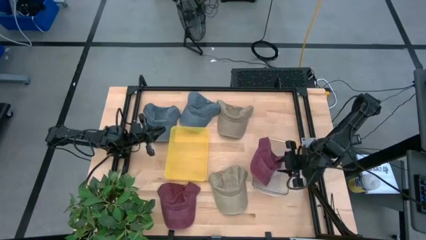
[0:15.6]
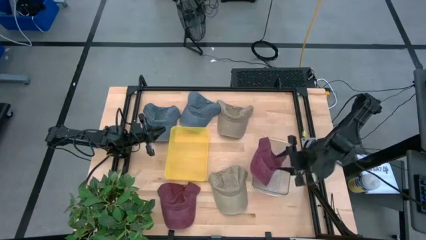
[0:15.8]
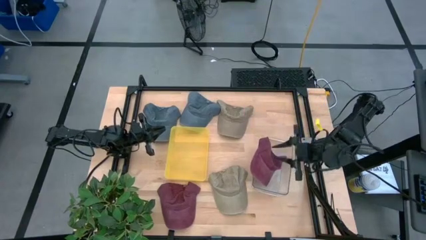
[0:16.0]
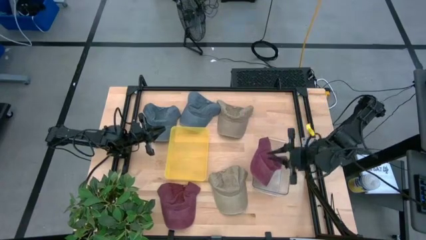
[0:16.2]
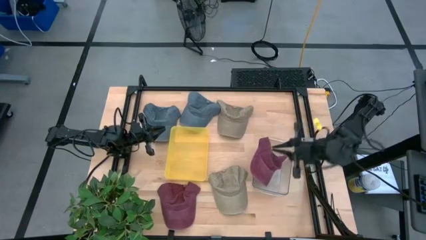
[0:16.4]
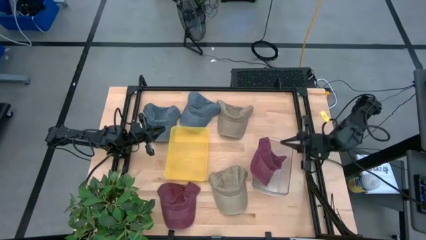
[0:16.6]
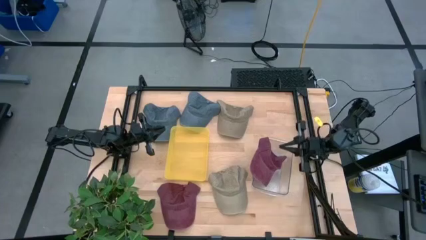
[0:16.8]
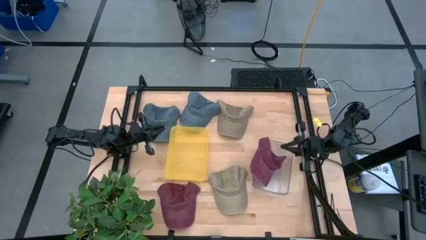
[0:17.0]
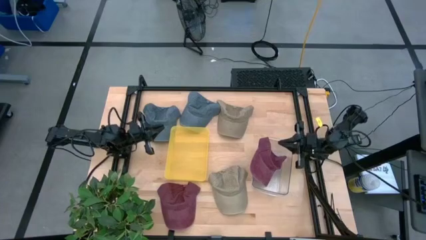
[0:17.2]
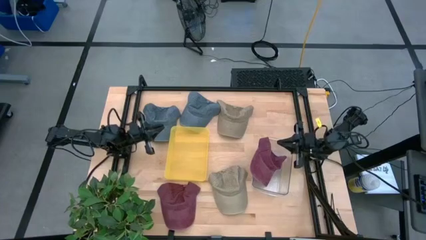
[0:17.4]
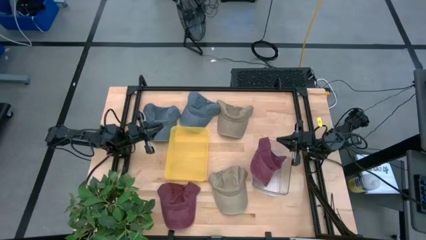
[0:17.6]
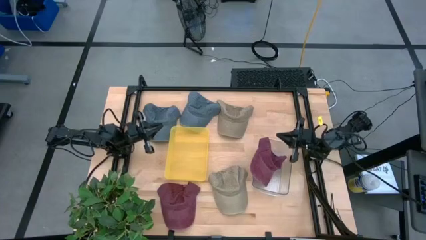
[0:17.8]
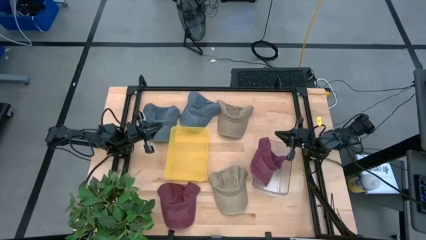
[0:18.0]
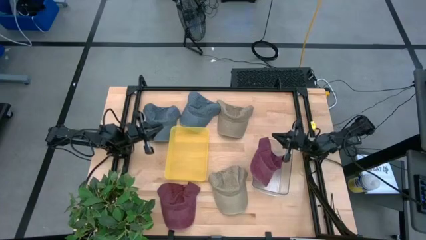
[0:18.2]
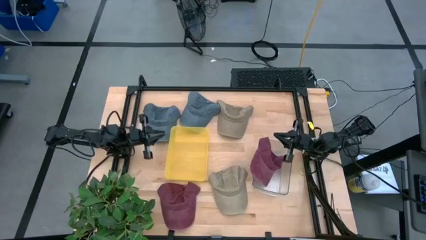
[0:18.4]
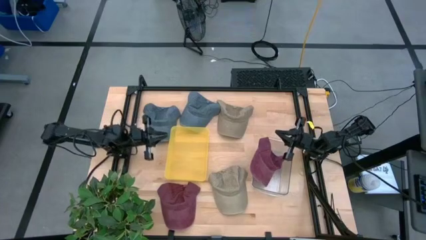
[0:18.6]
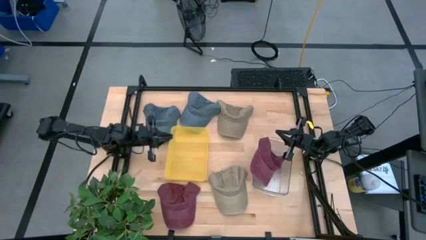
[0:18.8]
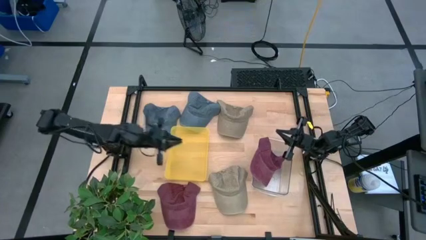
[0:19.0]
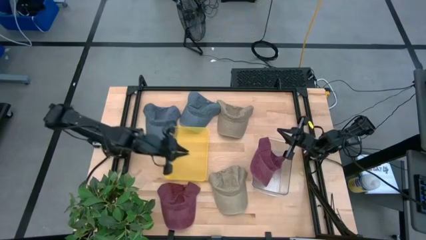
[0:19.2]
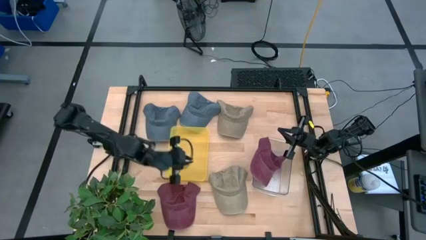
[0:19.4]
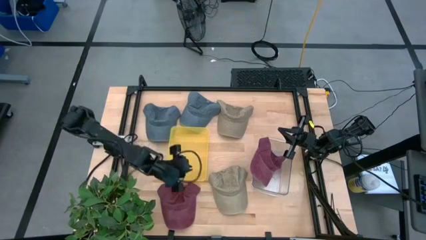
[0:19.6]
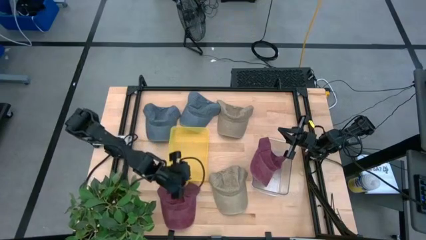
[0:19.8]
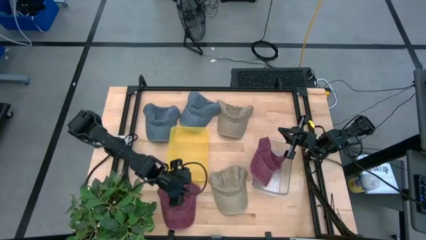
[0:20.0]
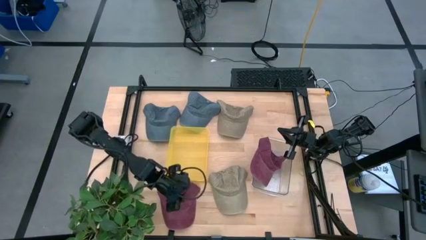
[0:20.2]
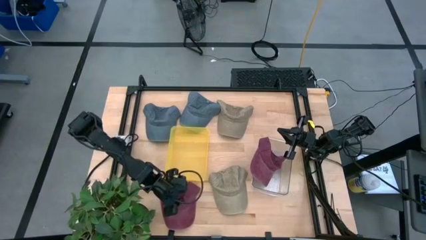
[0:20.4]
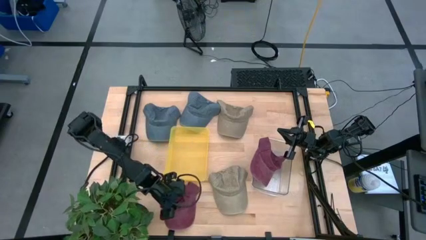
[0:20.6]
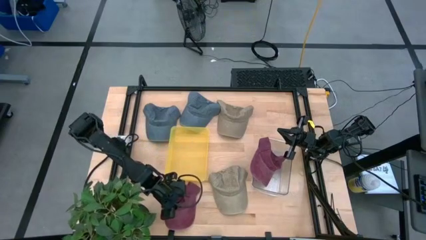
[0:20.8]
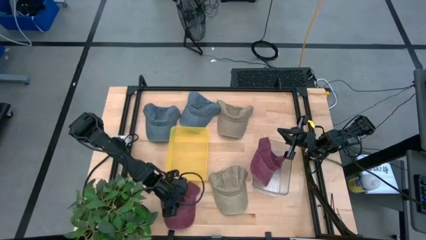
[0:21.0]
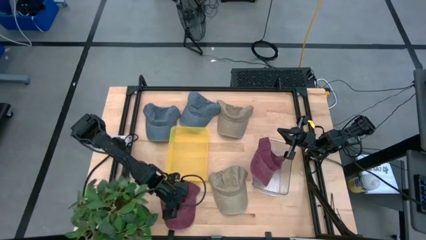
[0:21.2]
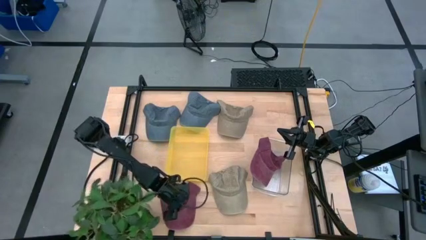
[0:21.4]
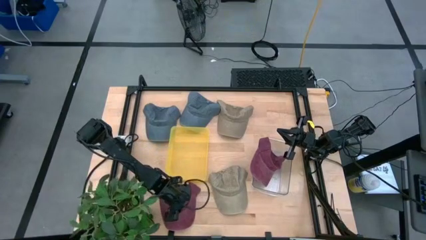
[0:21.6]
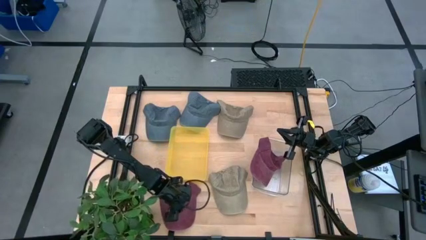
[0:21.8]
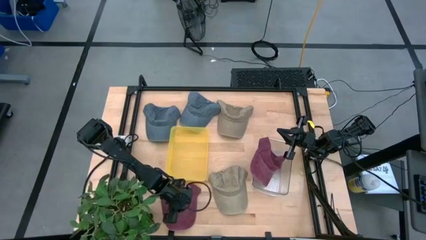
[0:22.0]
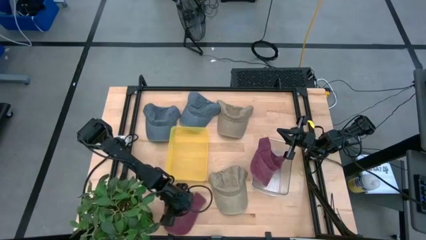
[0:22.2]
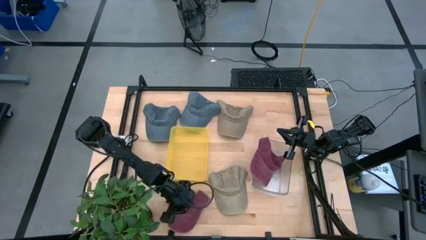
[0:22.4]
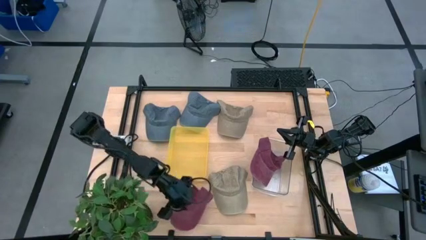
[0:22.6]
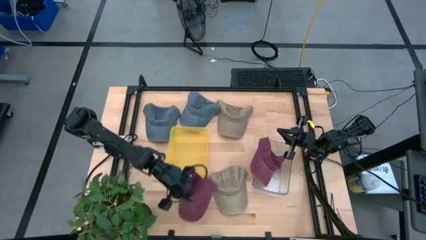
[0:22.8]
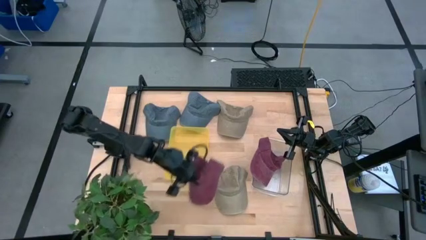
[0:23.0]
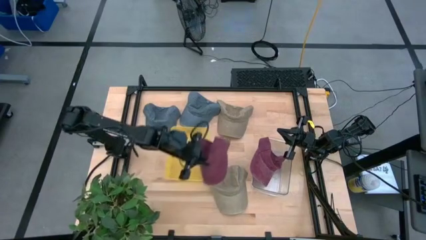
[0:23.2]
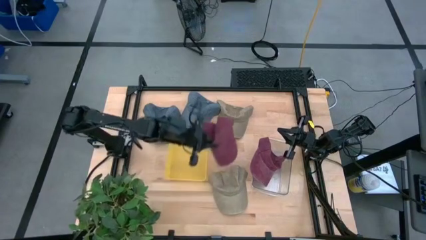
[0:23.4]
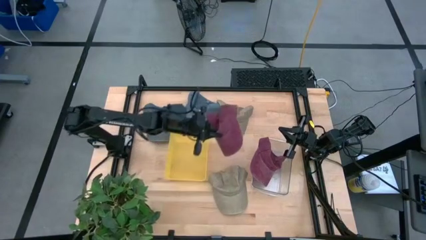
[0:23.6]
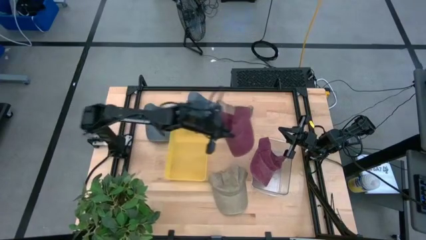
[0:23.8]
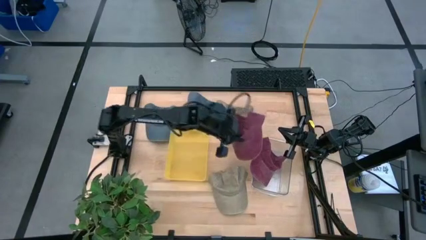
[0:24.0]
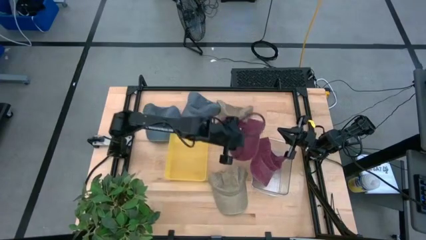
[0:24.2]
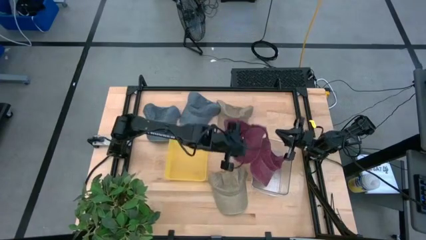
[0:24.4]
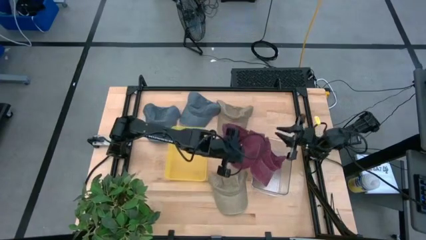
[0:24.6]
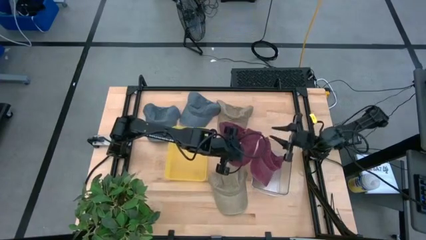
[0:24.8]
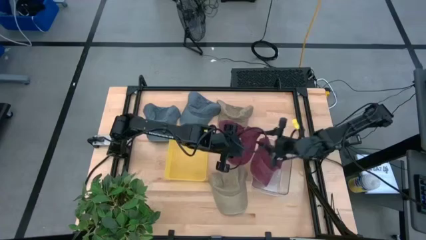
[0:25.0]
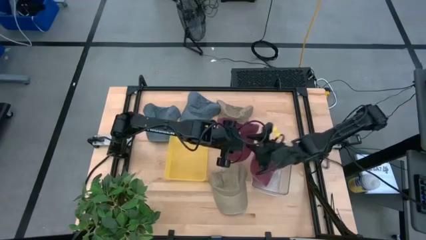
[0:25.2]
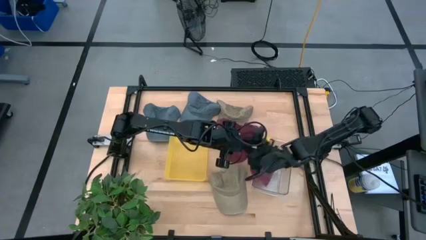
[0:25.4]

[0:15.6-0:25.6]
Task: Pick & Place hat
Put the red cap into the transparent bin

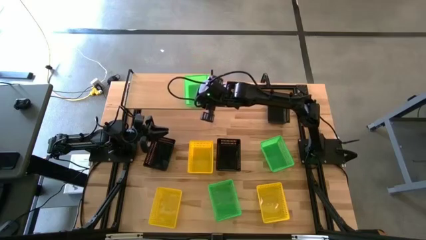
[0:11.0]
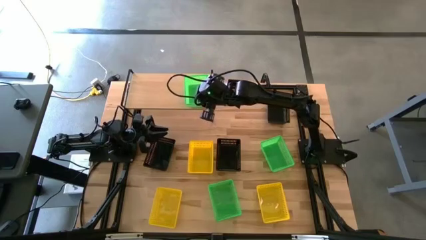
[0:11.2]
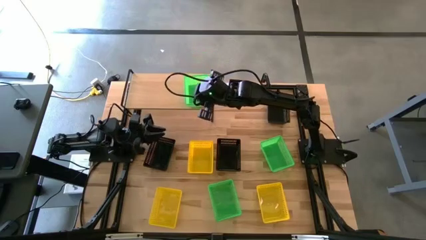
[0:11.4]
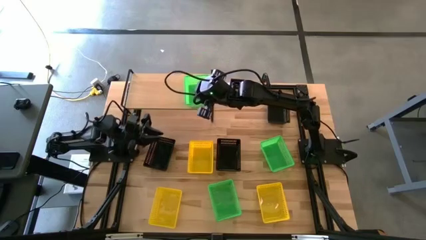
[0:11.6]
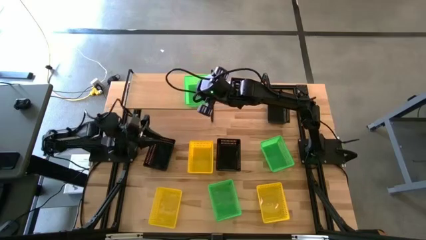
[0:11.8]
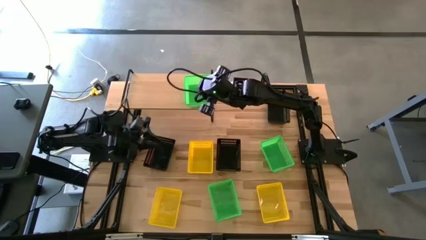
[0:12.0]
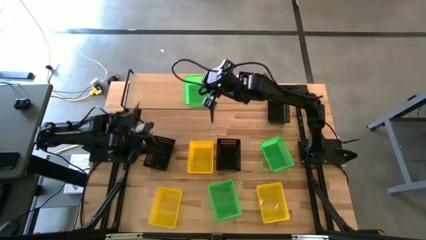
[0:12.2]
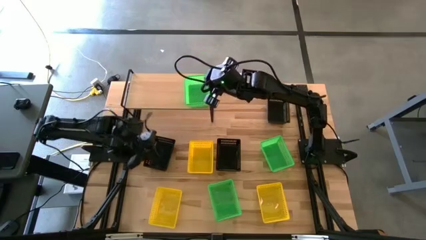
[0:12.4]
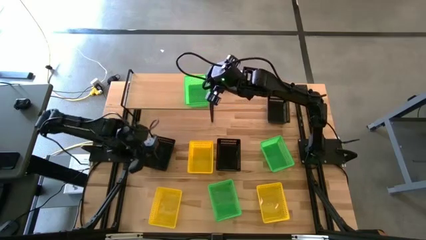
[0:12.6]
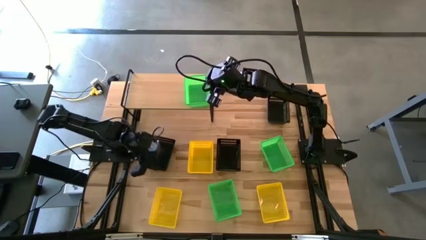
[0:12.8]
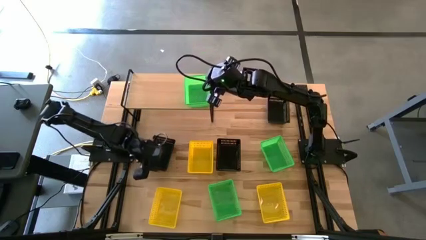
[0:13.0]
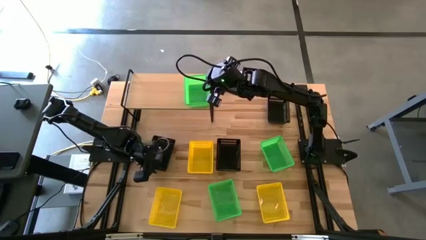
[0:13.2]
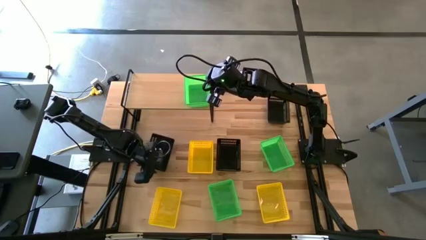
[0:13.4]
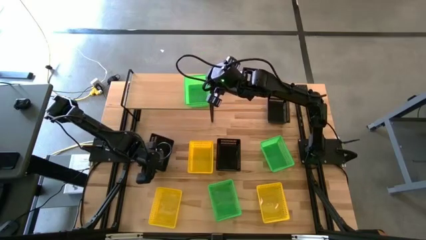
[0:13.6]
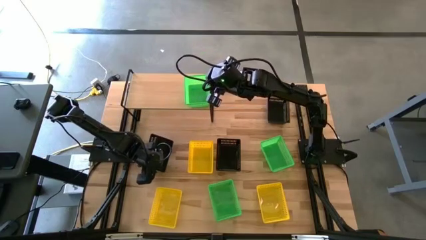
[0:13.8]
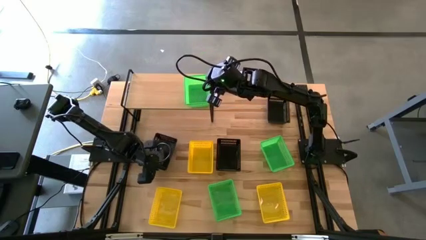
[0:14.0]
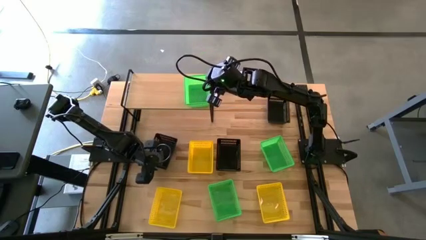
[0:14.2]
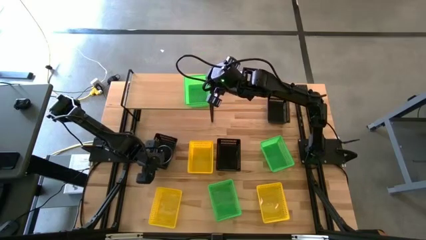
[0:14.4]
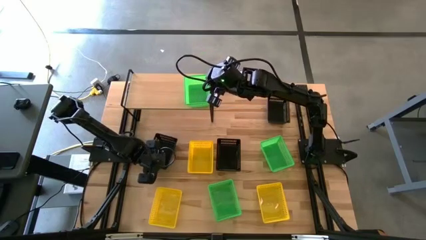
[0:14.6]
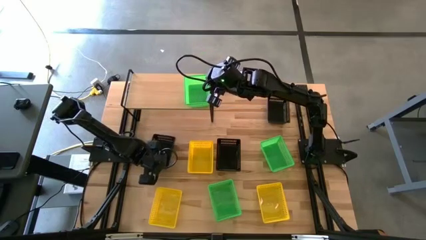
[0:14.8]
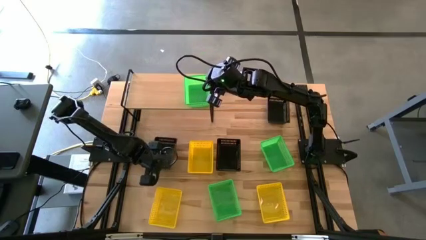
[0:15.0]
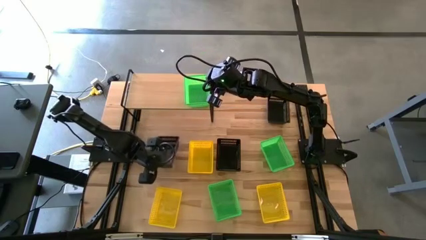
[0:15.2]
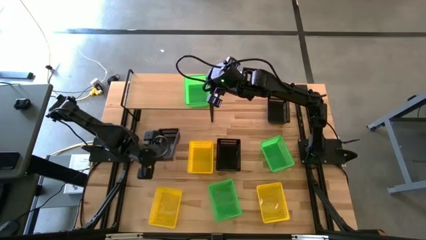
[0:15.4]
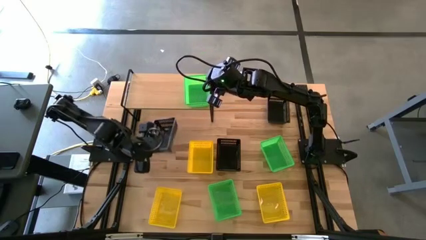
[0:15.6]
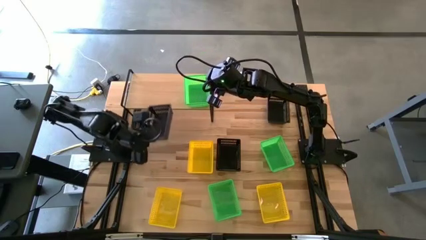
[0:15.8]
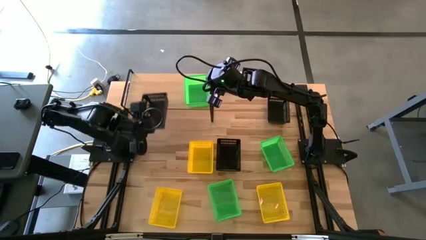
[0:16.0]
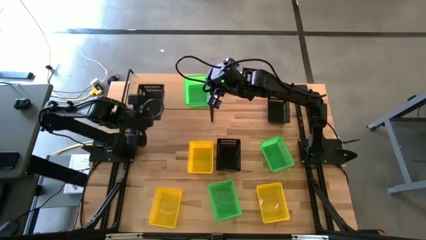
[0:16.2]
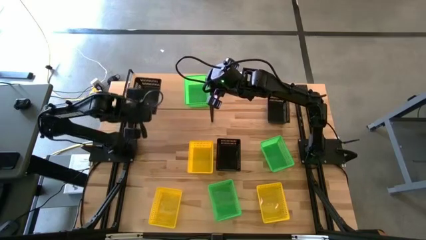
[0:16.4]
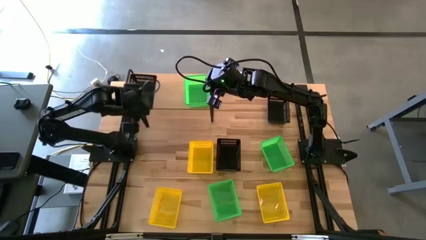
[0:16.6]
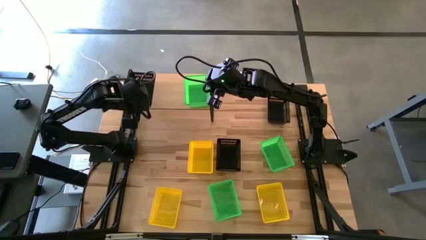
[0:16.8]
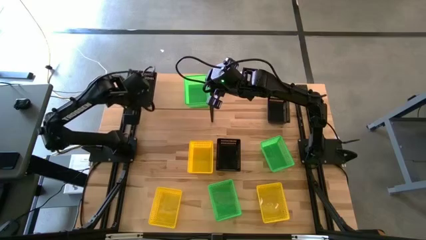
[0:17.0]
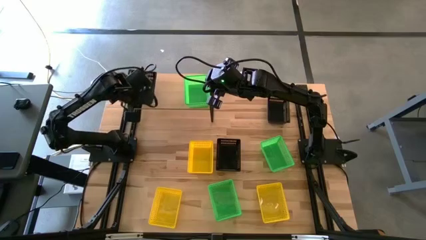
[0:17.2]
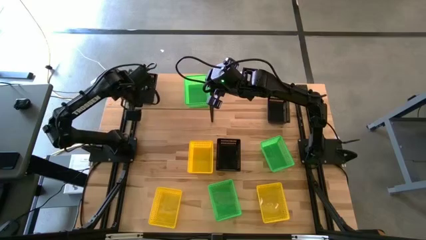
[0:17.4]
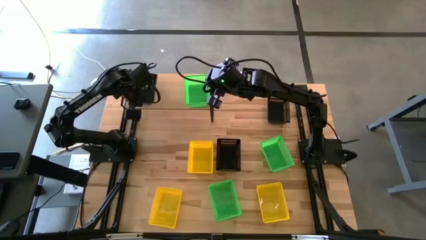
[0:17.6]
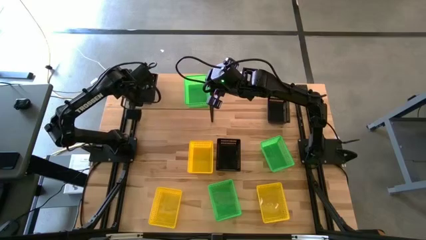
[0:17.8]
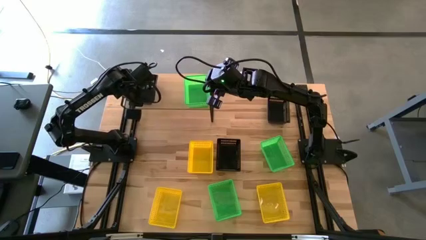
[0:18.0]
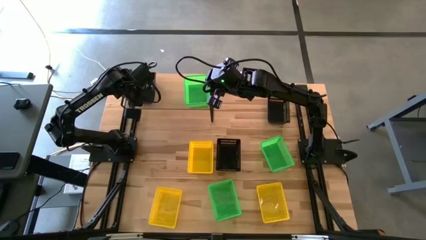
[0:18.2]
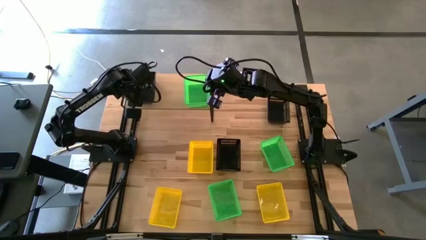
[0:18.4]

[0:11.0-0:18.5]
Task: Stack baskets on shelf by color
Put the left black basket on the shelf
